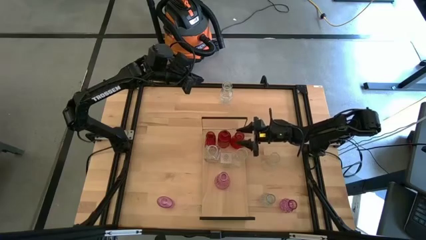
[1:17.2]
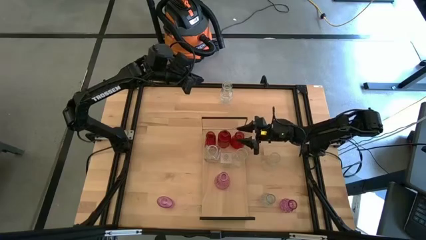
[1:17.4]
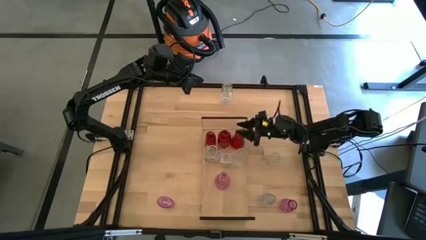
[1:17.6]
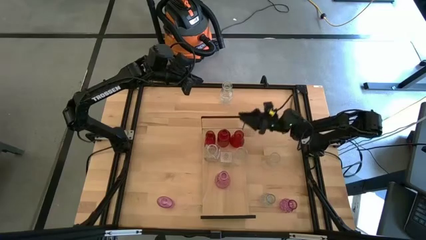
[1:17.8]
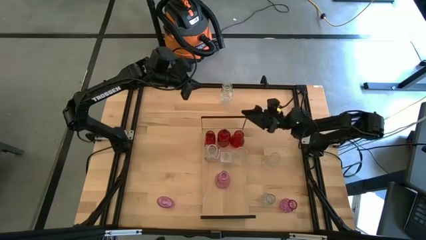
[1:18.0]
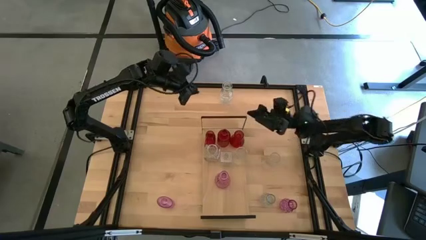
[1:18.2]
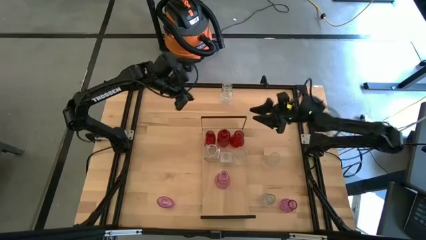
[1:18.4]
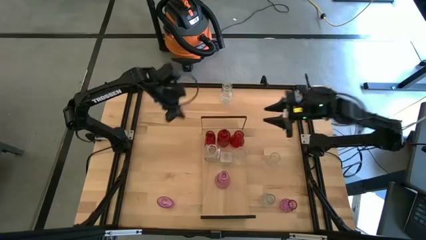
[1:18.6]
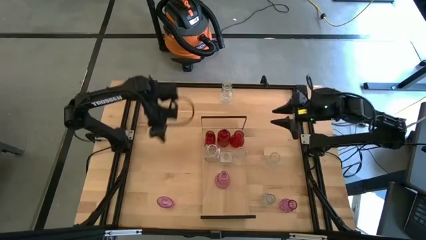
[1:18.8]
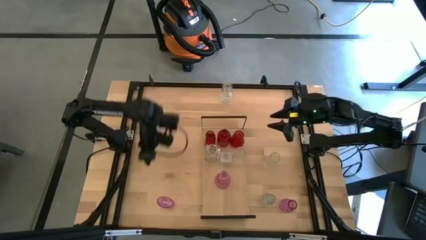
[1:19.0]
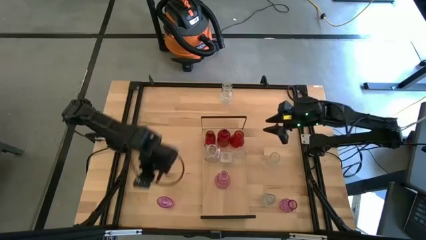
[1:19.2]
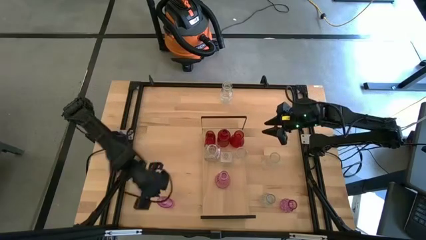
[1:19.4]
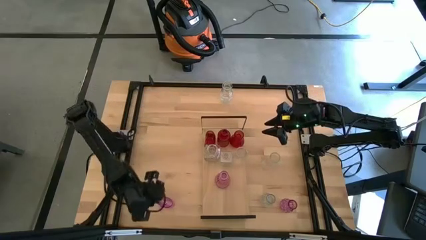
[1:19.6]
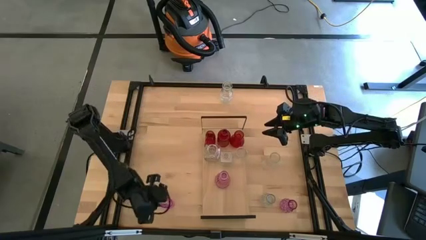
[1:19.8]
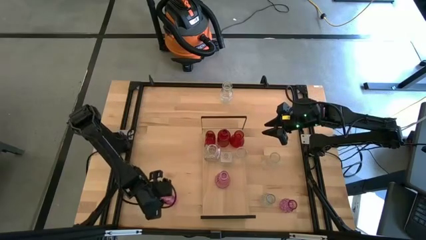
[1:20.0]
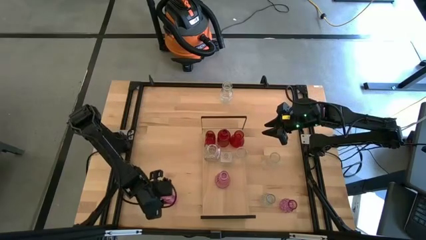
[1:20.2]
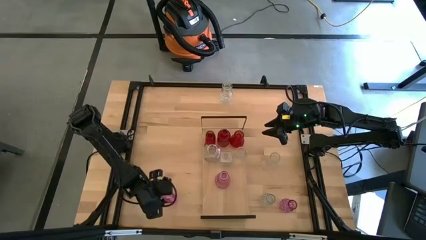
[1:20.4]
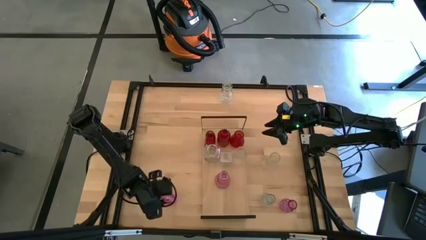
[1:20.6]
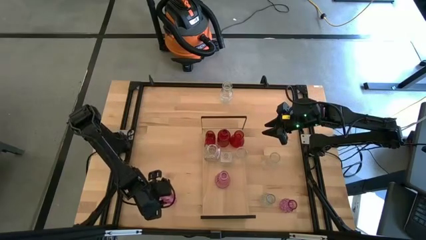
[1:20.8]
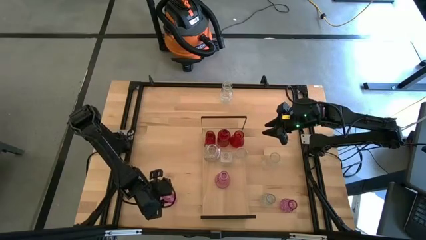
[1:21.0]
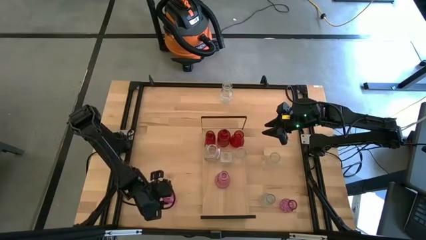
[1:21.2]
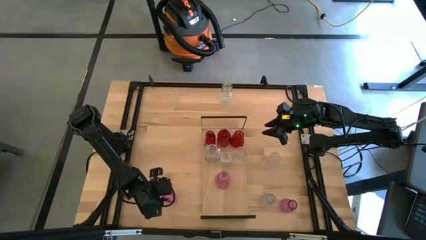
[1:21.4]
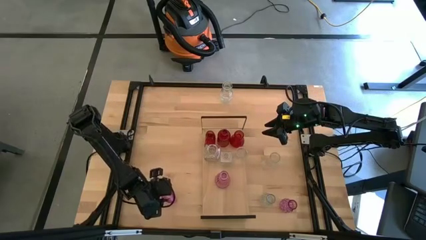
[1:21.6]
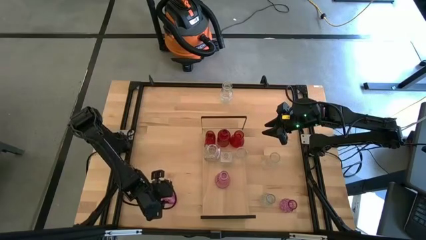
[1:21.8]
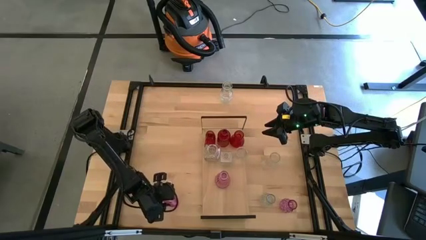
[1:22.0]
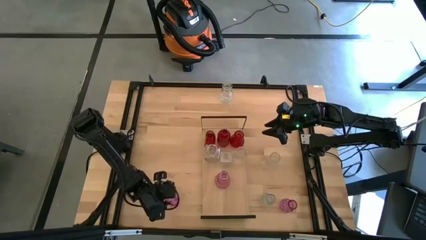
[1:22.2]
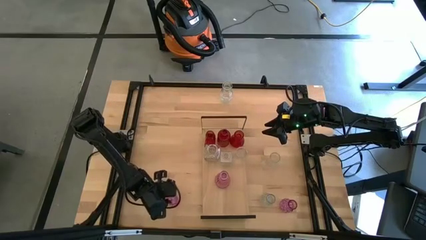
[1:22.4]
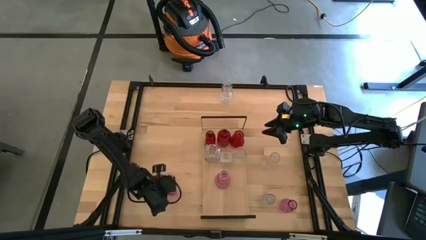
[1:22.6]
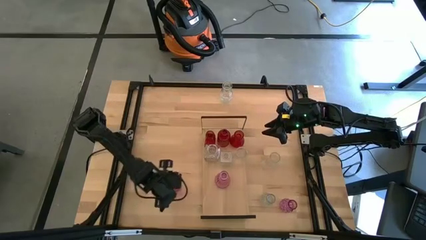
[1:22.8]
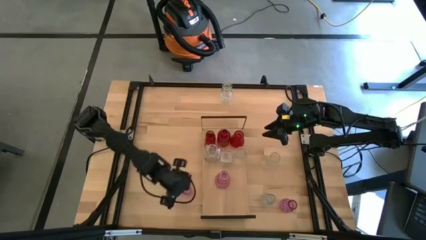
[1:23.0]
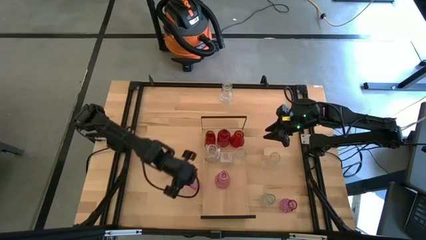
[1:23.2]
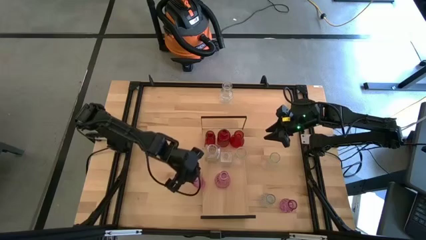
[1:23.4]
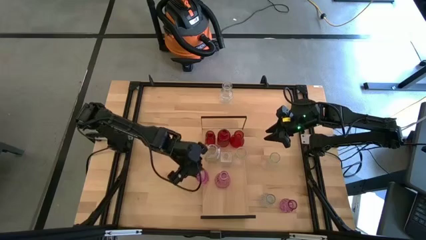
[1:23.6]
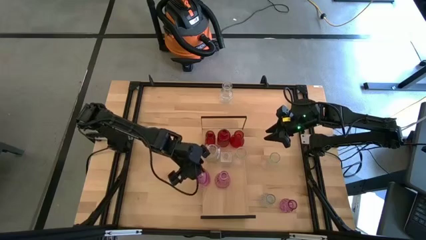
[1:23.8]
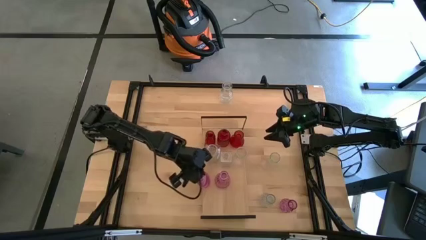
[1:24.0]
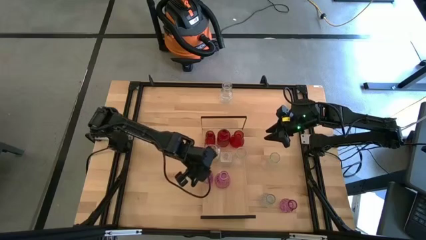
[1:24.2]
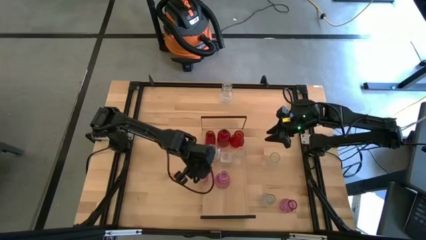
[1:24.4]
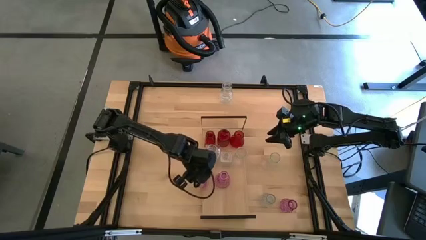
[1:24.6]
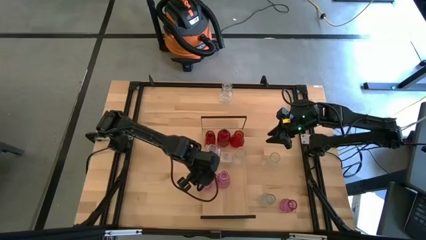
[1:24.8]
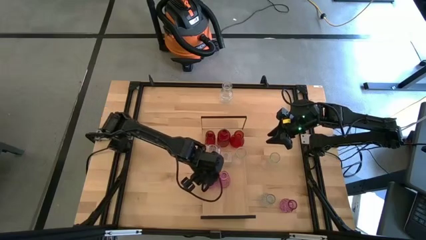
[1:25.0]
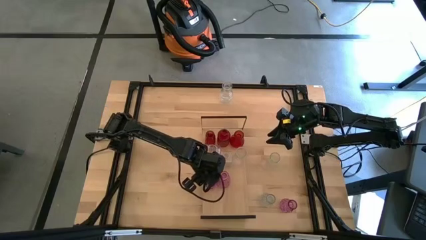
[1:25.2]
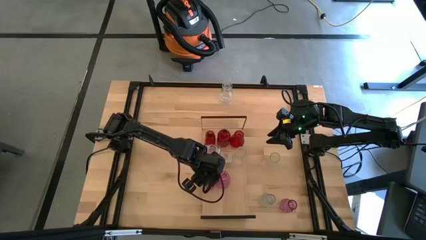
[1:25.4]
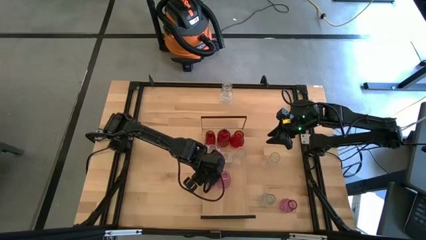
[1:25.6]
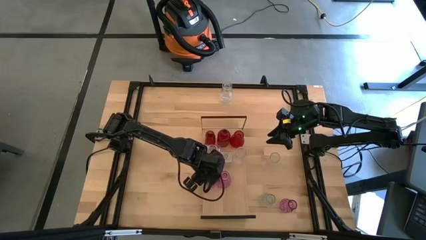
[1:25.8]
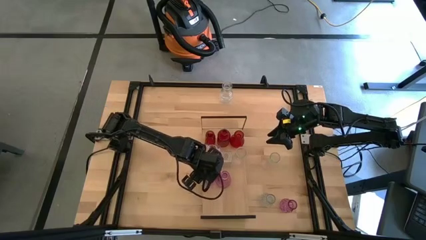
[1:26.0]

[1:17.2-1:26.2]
Task: sort vases onto shelf
Put the light violet on the shelf aligned with the other light violet vase

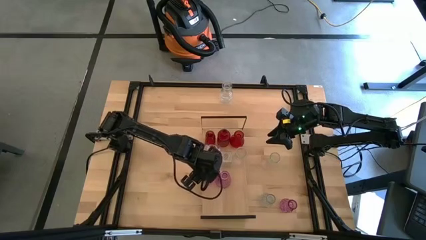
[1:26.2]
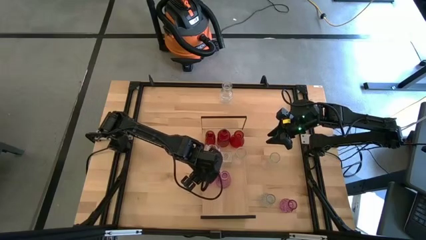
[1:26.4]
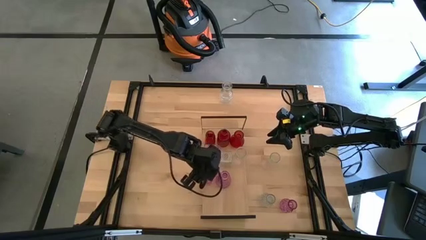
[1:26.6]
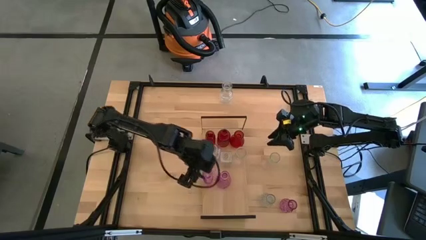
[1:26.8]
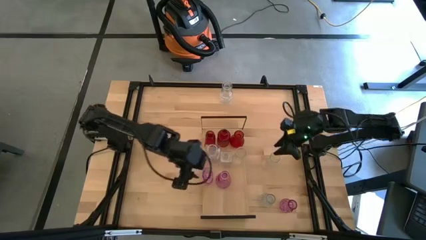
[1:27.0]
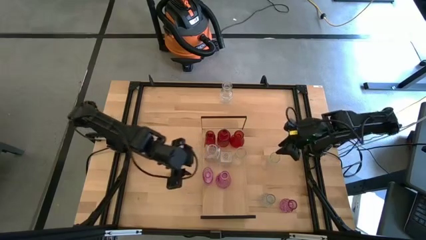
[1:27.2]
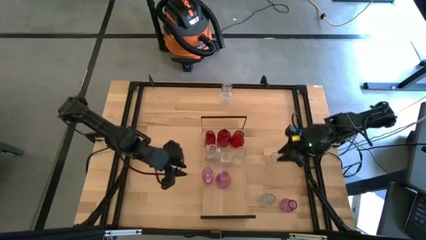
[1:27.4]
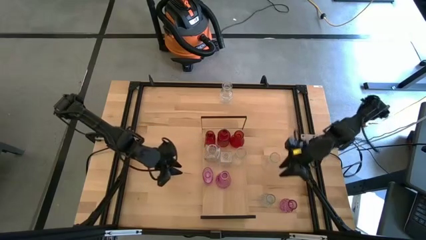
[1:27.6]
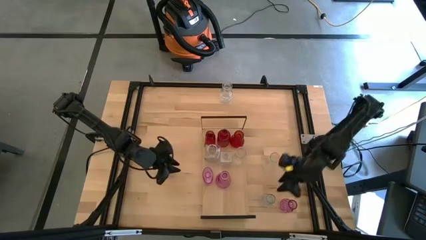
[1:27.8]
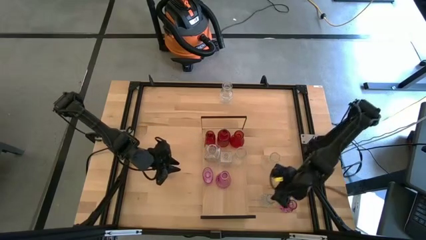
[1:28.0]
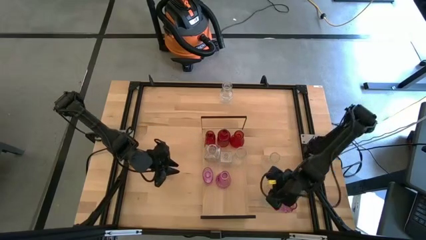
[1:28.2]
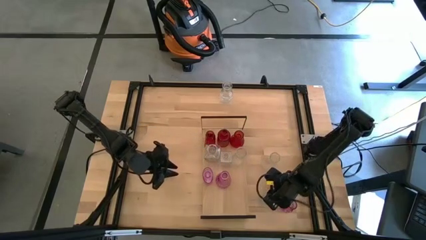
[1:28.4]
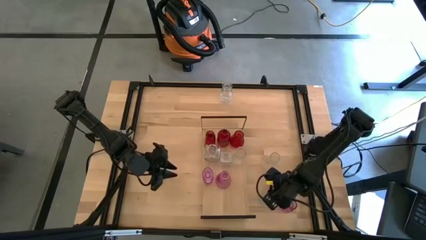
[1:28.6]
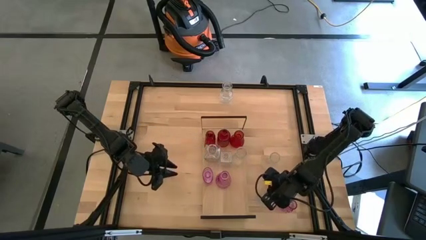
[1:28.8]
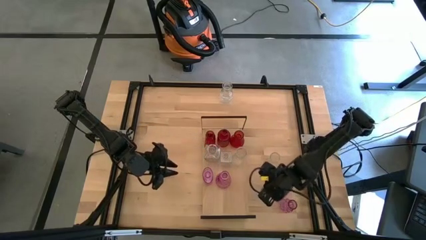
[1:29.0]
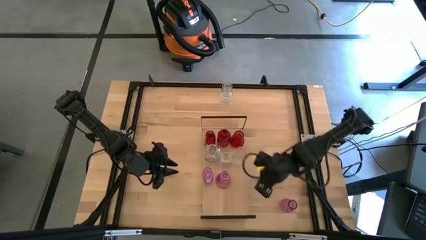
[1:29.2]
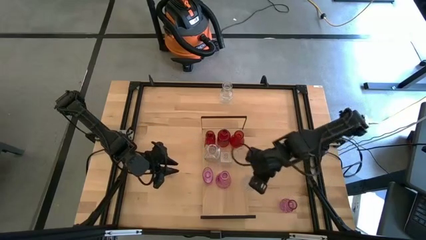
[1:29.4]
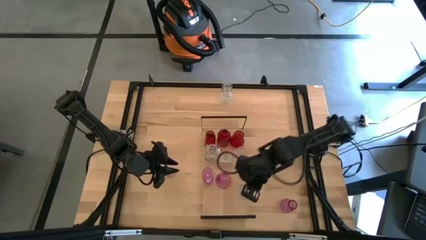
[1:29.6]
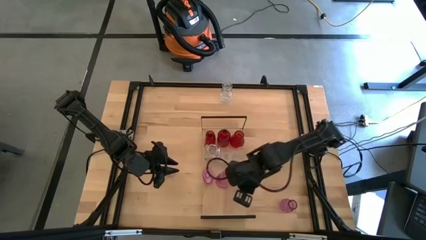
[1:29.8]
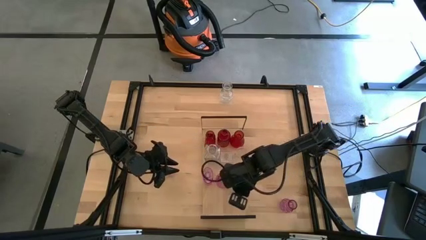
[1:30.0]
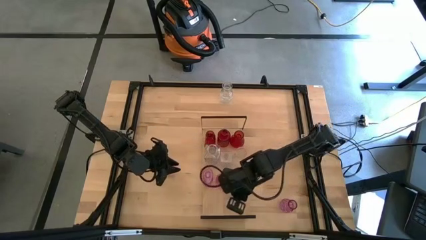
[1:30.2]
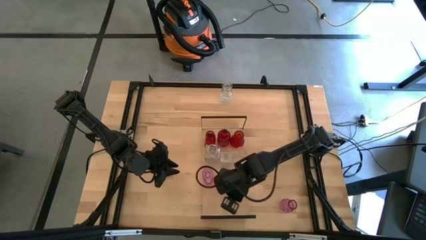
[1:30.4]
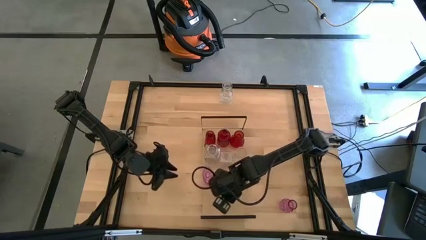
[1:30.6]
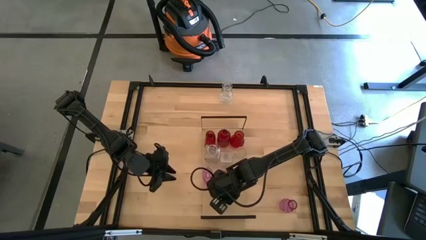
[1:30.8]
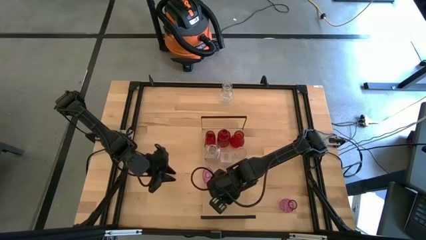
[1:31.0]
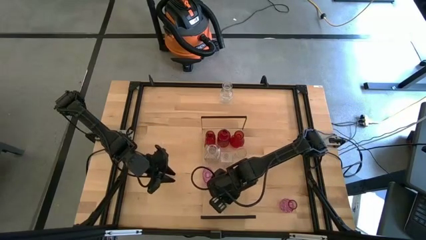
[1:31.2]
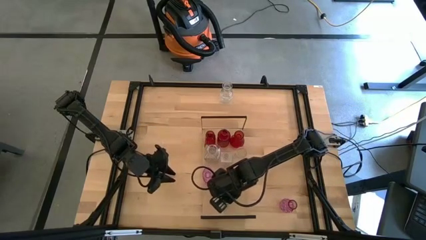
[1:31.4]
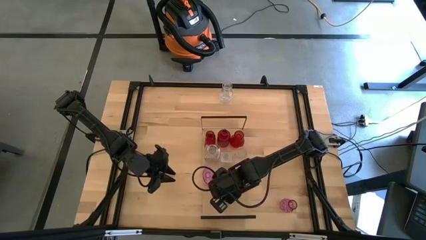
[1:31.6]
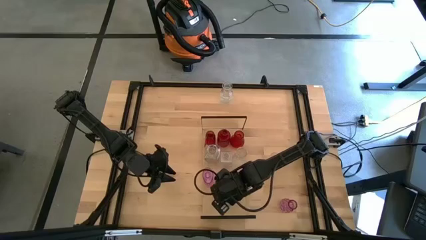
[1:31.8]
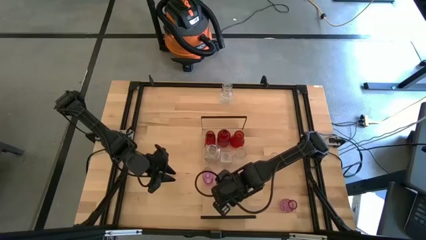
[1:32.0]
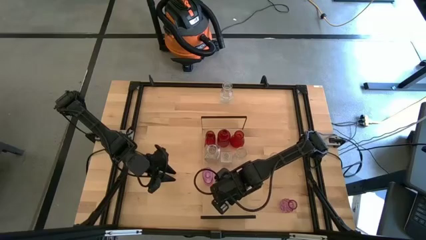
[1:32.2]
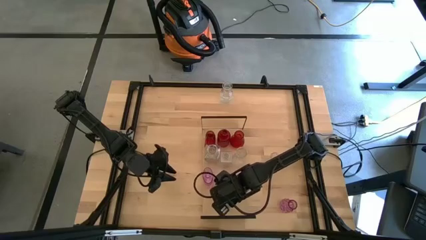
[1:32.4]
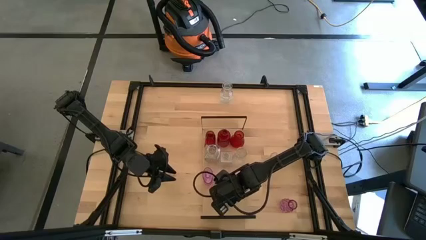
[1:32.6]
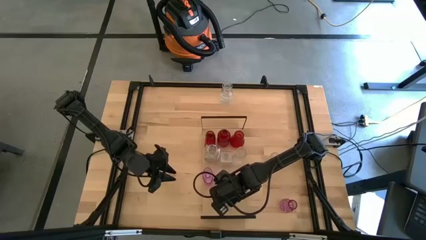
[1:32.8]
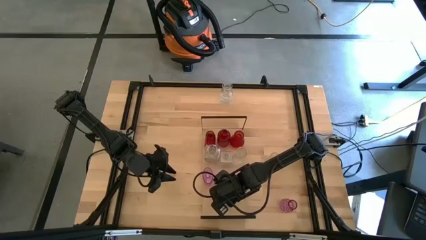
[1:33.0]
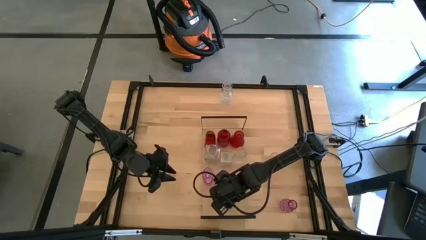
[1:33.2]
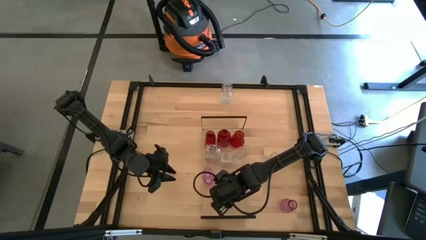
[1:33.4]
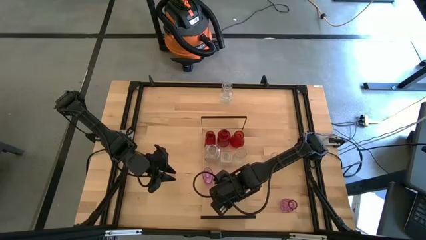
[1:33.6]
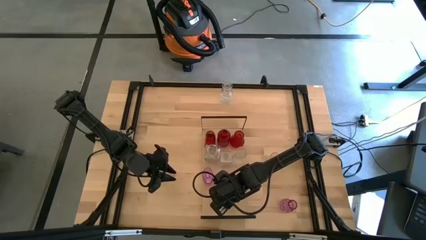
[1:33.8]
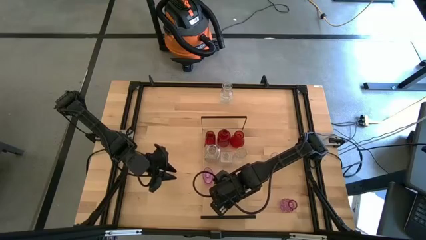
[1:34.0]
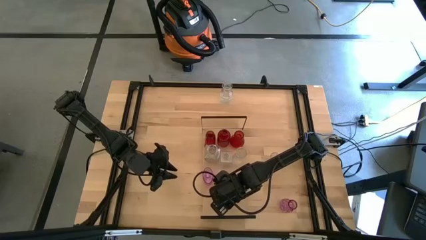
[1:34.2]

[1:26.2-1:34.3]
Put the transparent vase on the shelf
